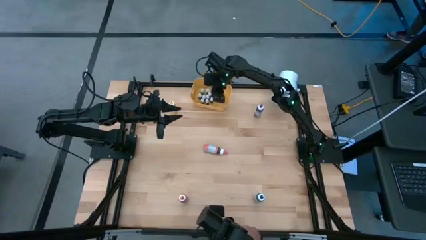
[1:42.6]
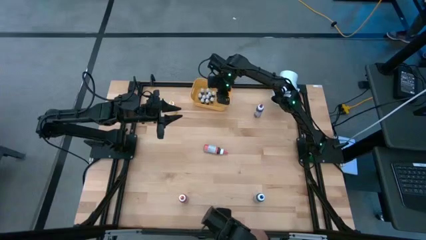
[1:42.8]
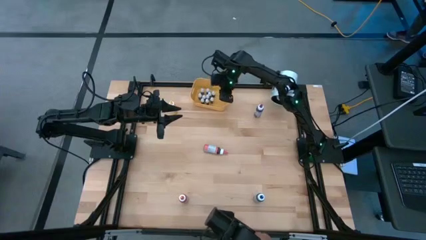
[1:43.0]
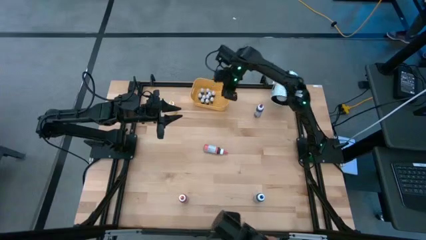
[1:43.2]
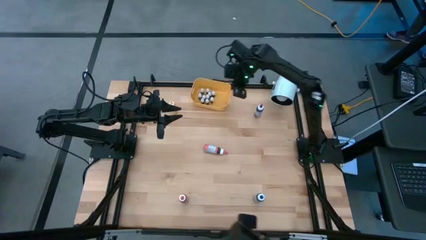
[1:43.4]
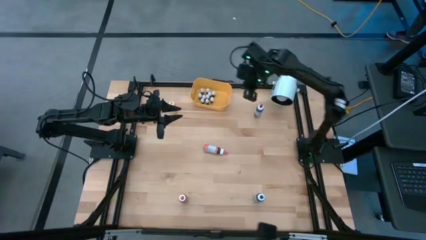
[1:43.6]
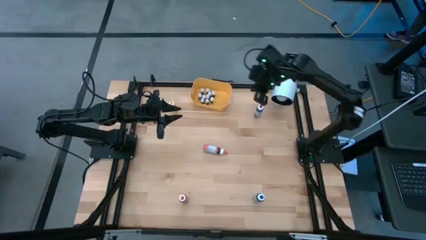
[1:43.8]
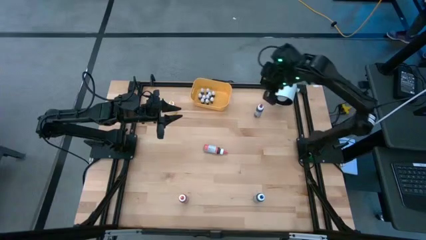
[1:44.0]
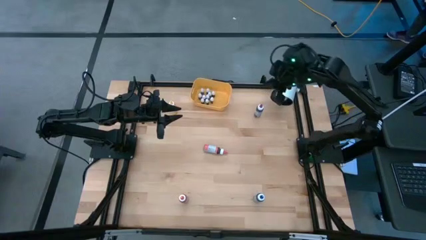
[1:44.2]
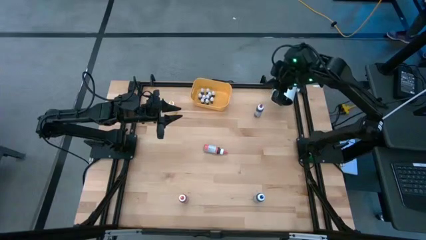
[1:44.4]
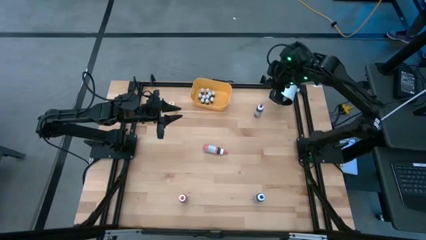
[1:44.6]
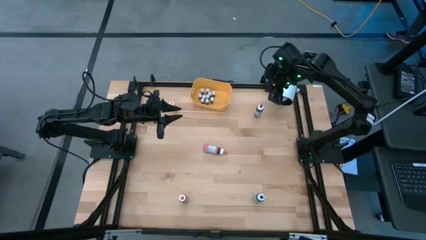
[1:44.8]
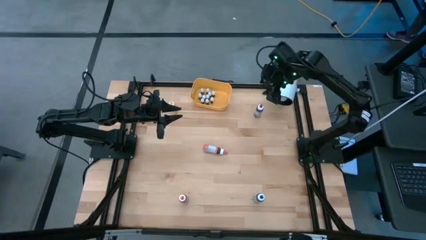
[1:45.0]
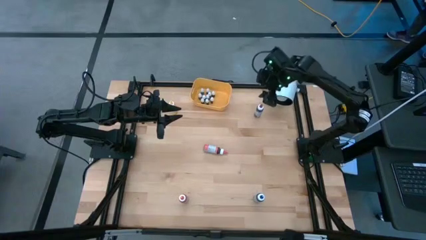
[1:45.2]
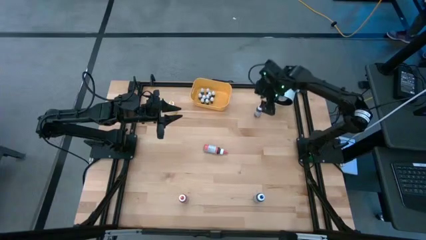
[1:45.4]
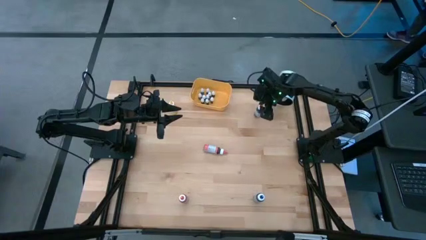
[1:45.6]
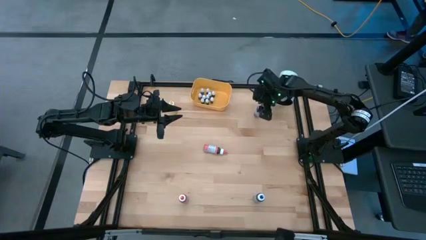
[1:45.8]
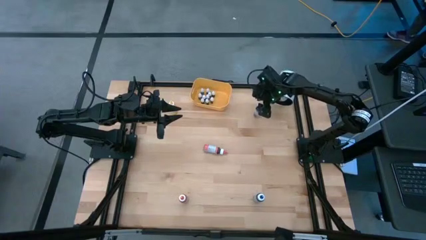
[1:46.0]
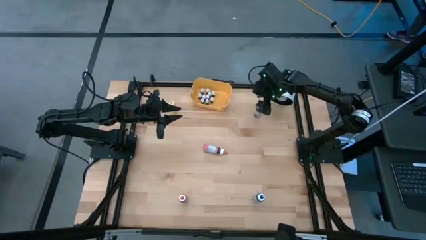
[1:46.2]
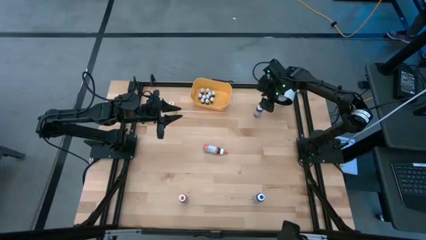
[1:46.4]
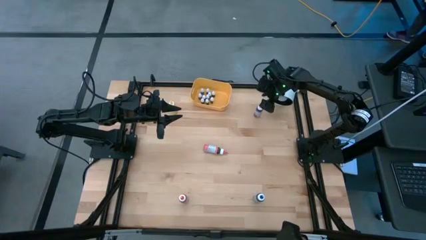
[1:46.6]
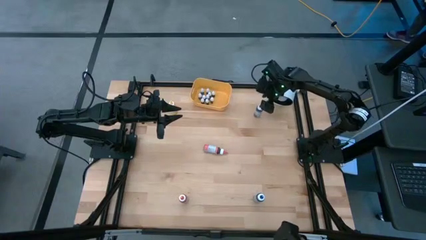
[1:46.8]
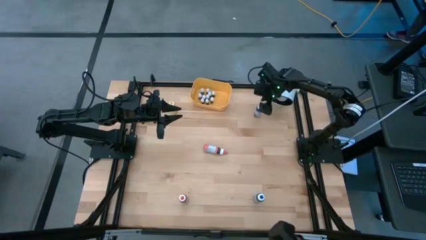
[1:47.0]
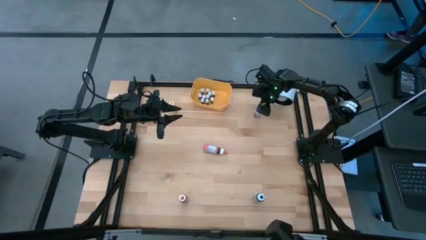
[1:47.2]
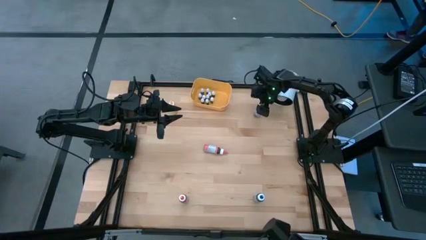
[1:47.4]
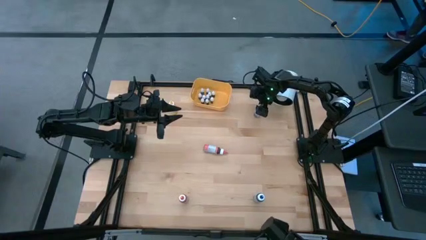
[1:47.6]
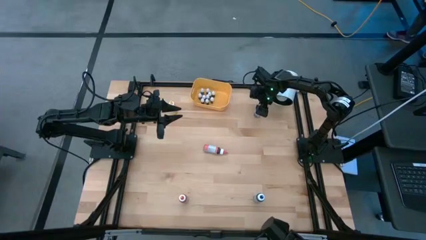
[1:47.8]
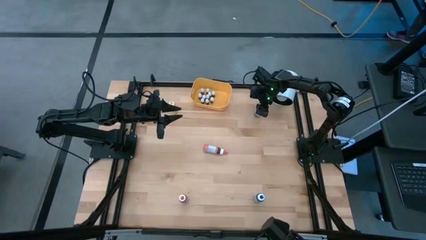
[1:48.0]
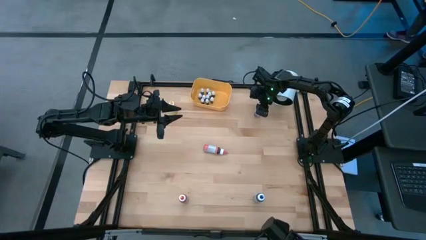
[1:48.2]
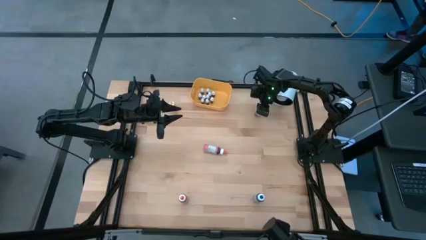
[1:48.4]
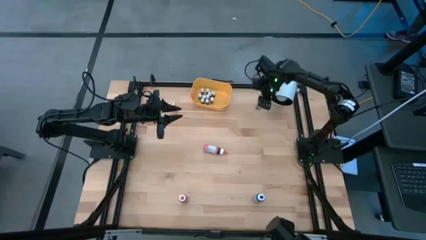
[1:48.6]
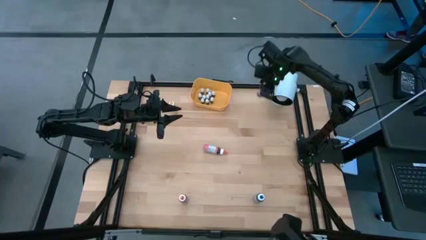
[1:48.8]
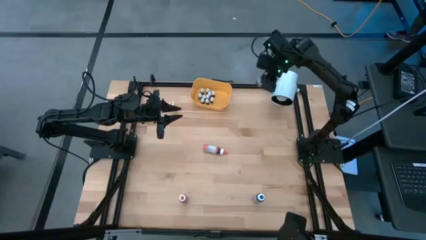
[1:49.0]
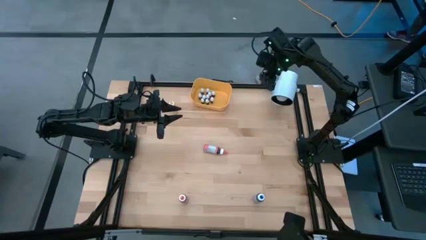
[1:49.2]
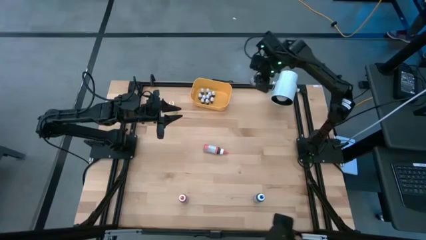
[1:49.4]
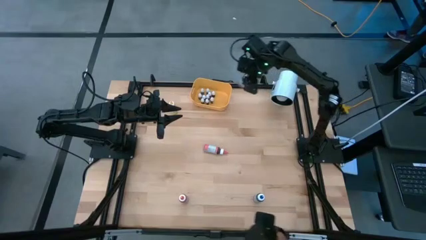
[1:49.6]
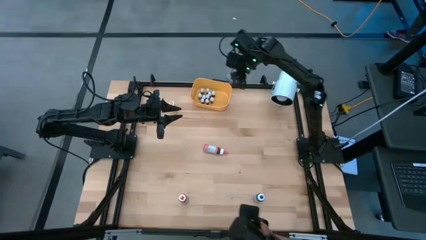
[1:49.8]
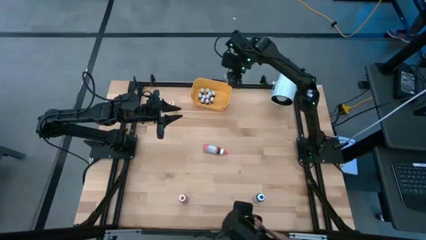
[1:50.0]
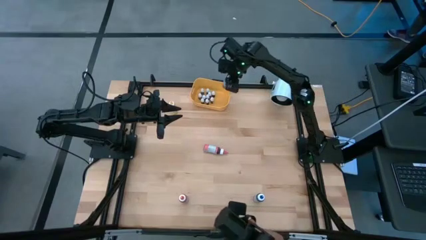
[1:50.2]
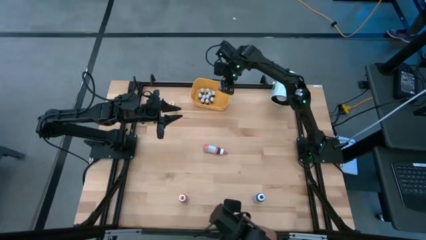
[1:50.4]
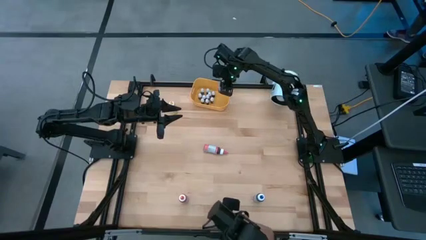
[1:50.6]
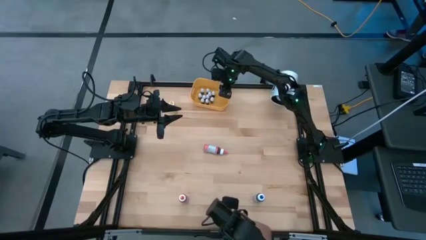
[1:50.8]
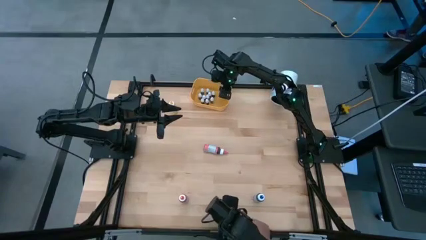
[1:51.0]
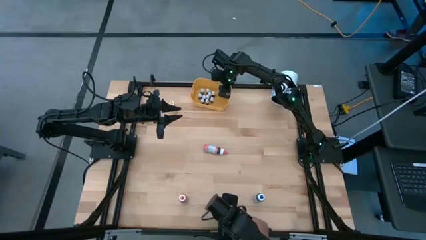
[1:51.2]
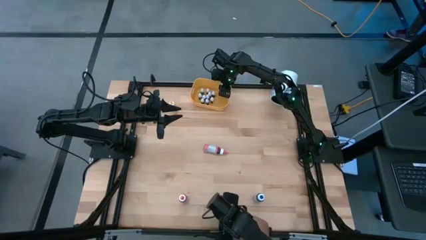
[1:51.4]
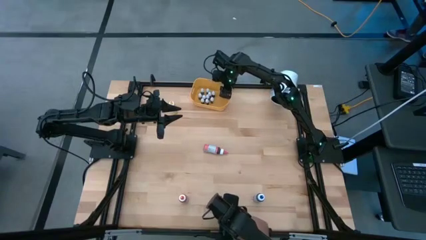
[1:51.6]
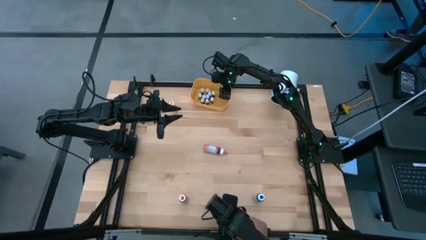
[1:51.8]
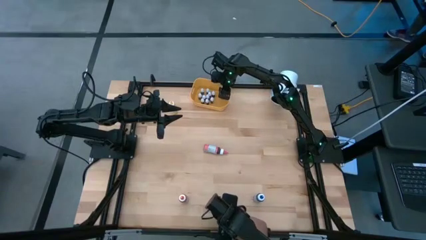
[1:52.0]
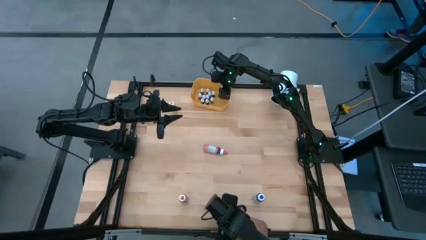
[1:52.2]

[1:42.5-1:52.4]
Task: Pick & Place food coloring
Put the large violet food coloring bottle into the bin

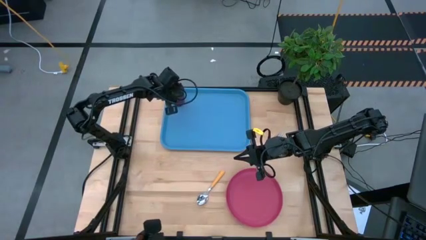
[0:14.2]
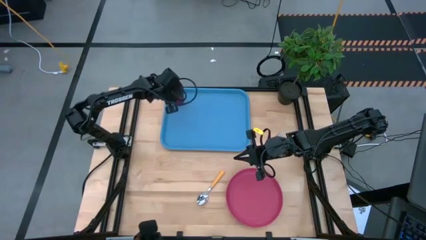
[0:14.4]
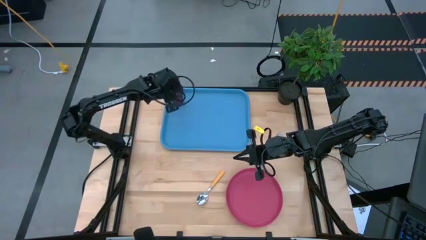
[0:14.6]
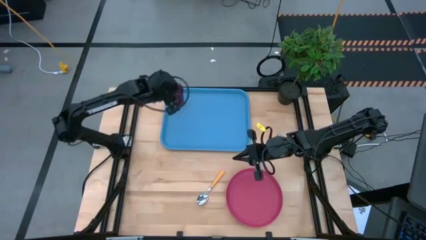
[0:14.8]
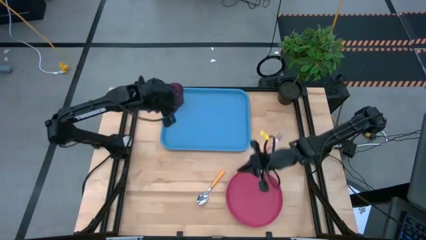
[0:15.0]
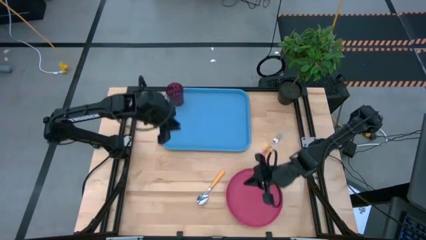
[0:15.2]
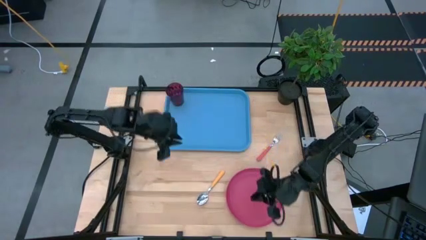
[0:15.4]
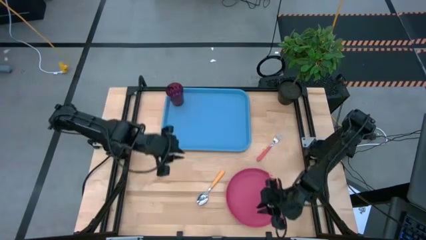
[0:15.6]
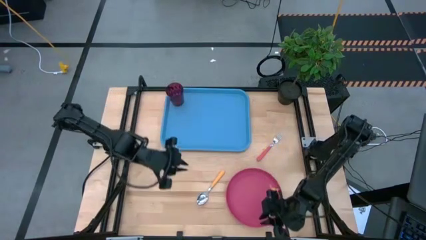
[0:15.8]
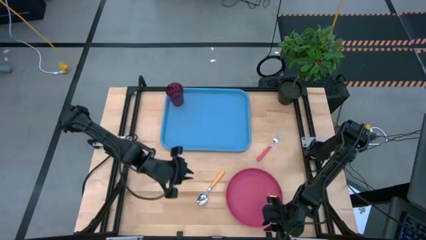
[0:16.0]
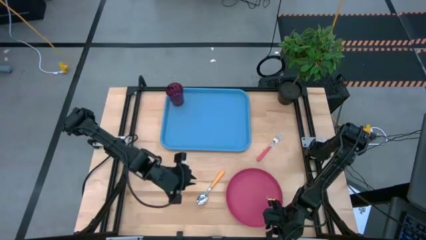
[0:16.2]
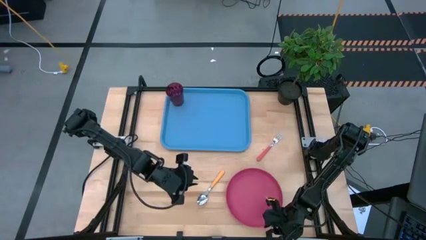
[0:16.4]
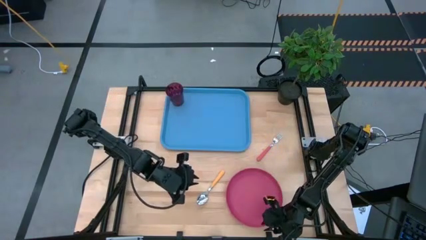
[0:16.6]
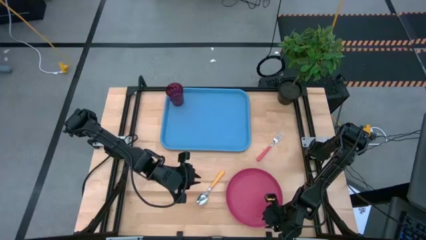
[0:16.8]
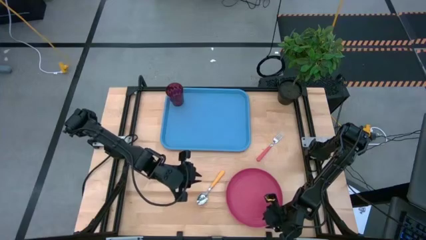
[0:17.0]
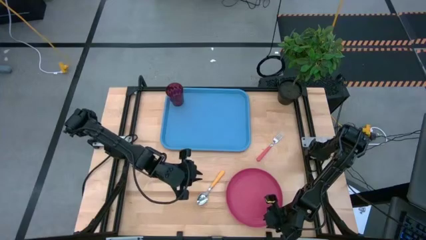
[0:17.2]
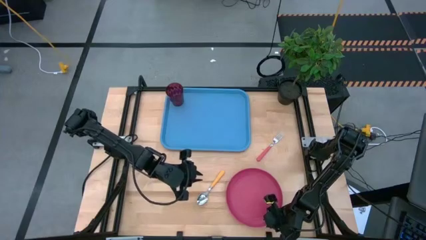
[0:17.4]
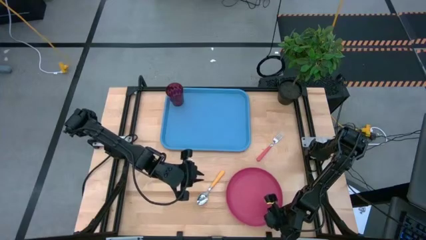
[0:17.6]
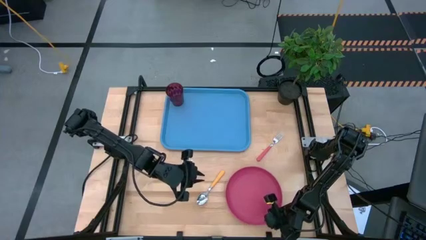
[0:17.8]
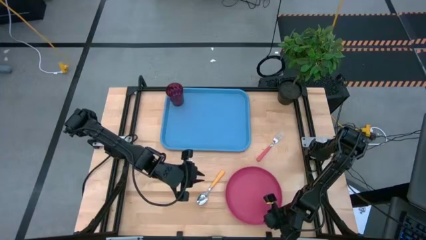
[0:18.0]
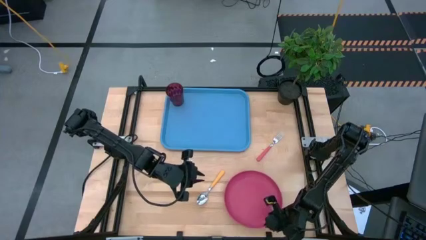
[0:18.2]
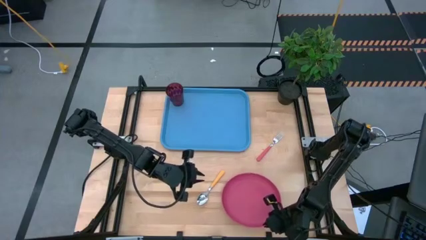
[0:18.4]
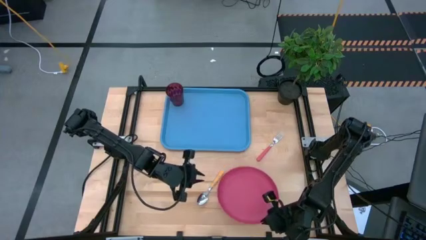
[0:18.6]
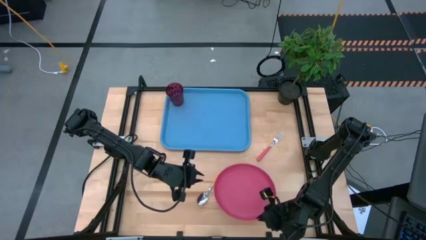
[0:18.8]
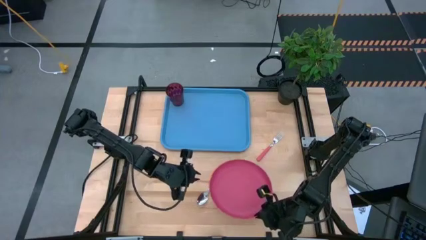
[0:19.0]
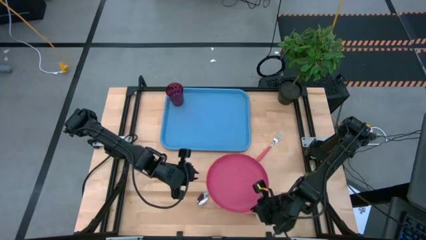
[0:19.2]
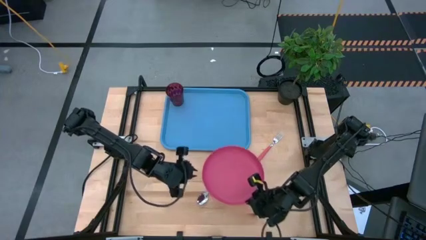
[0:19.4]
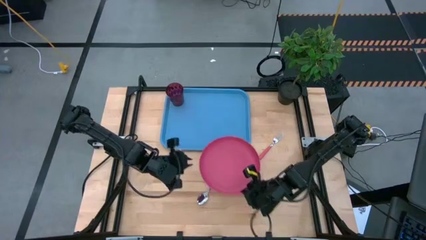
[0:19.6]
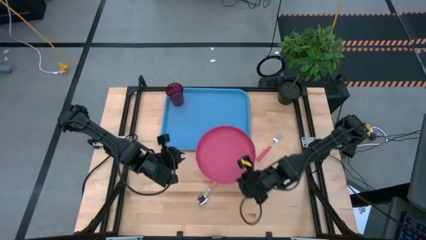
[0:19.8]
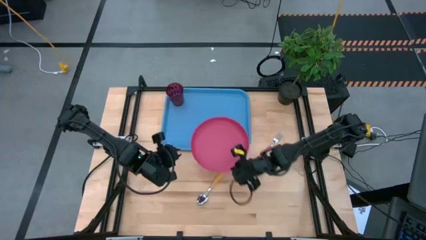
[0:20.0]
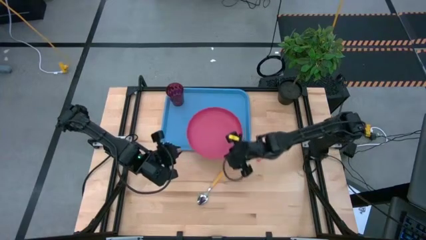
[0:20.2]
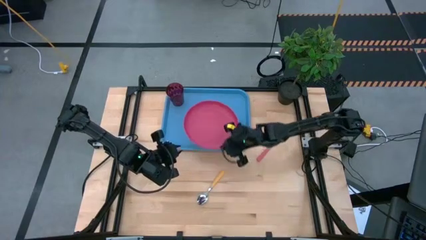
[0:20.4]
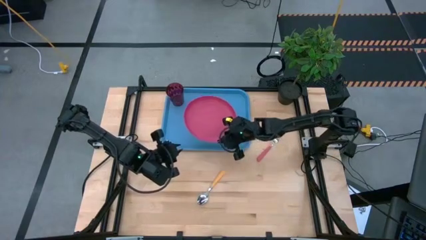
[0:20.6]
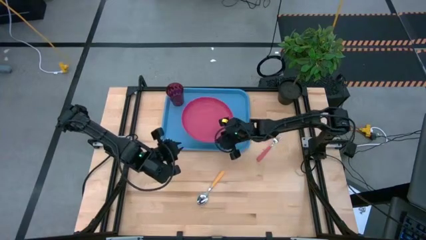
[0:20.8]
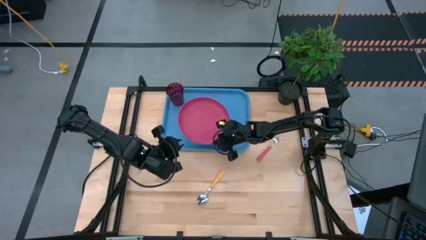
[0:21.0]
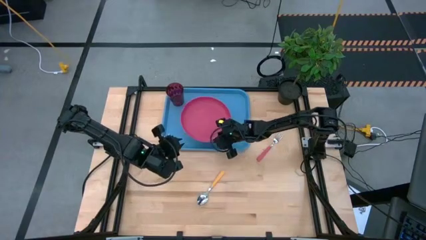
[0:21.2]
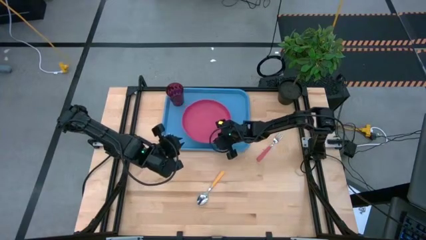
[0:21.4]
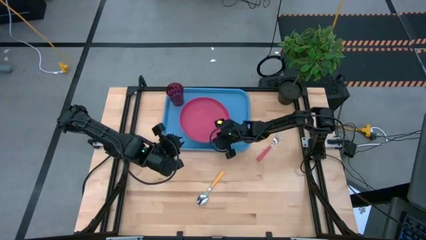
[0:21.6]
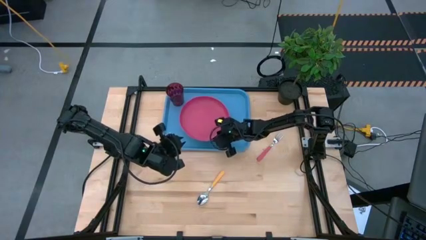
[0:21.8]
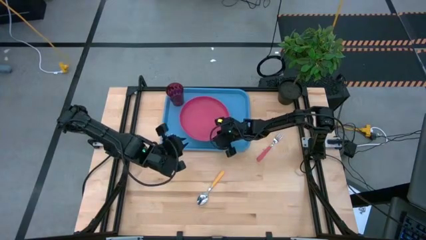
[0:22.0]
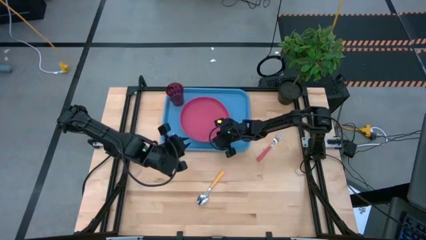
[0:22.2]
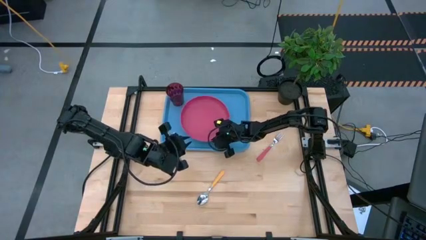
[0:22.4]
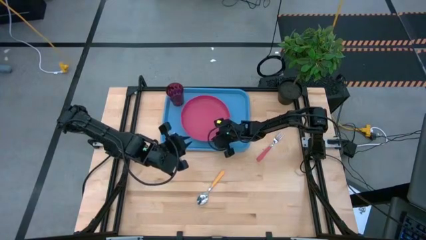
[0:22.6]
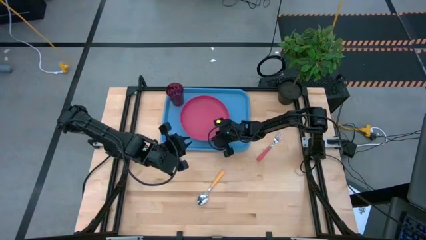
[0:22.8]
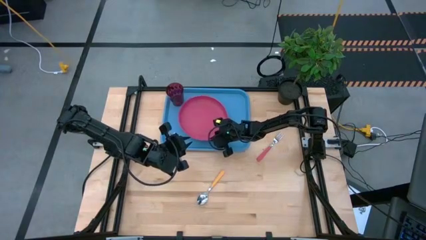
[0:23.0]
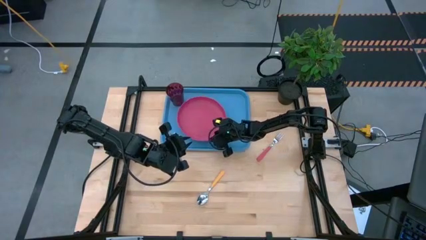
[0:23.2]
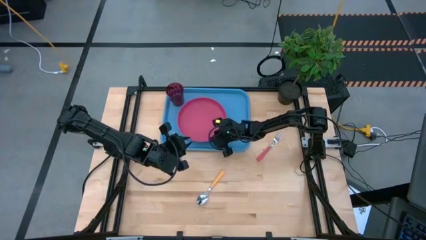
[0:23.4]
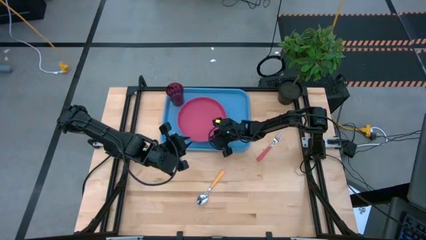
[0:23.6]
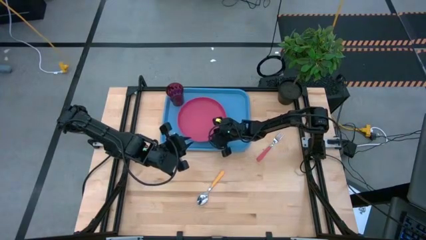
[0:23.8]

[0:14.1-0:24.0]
Task: Pick and place plate/cup/fork/spoon on tray
Put the pink plate on the blue tray
